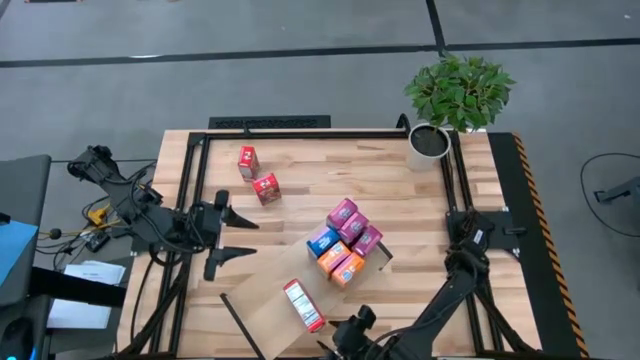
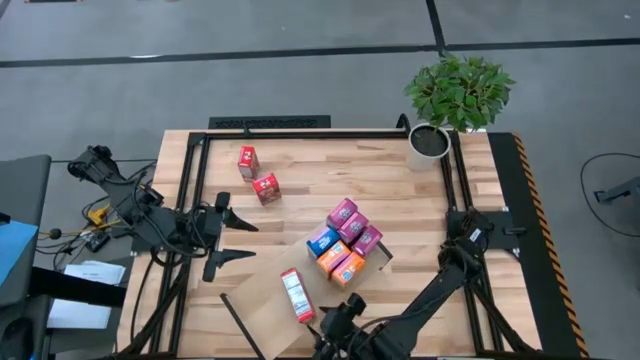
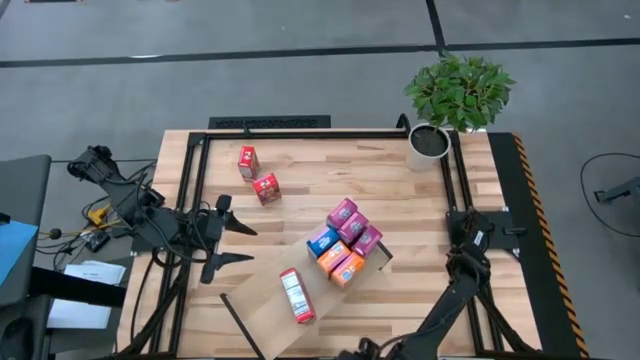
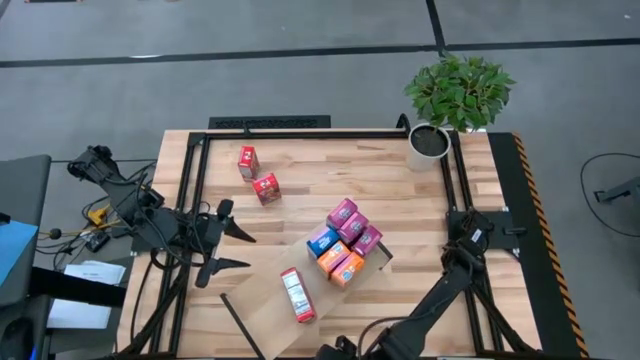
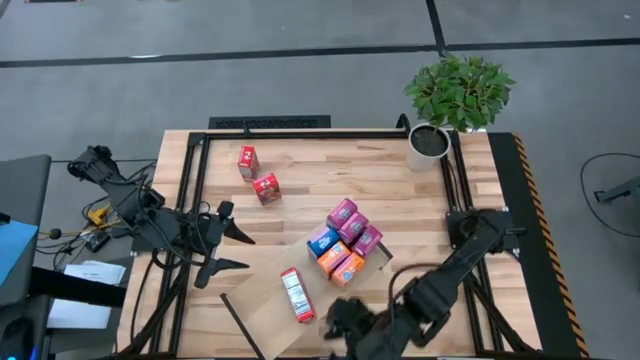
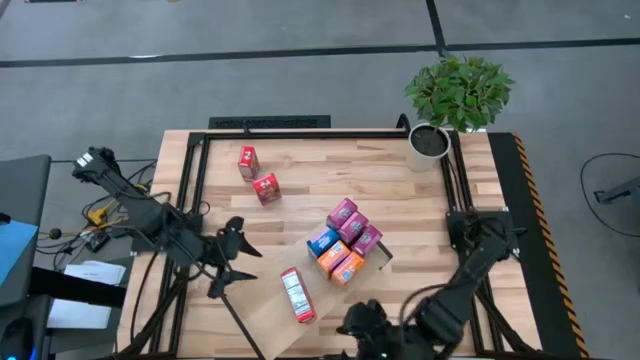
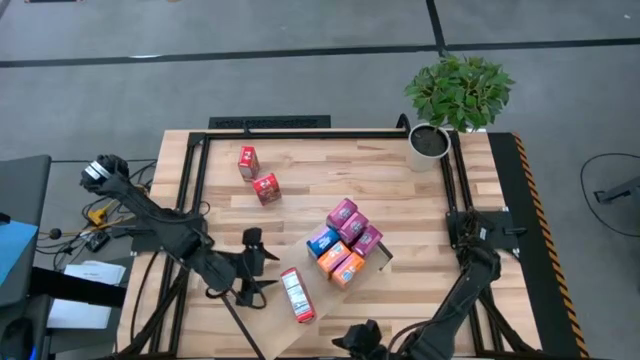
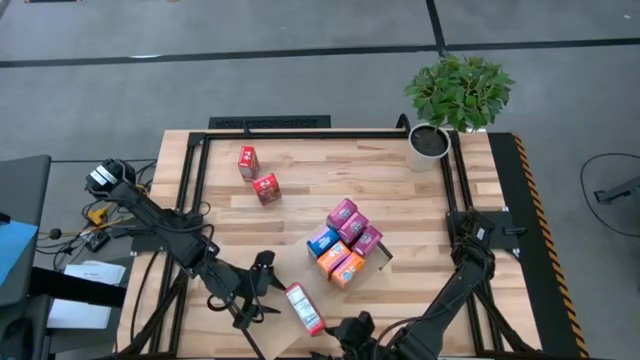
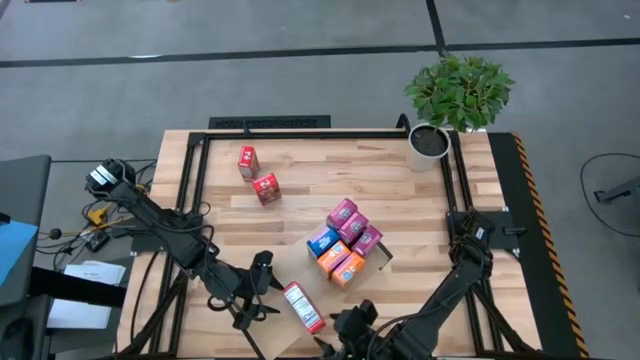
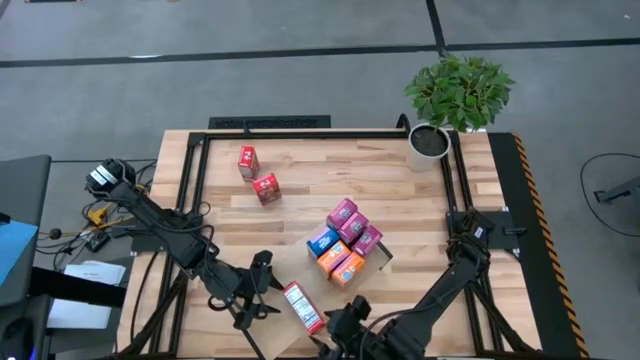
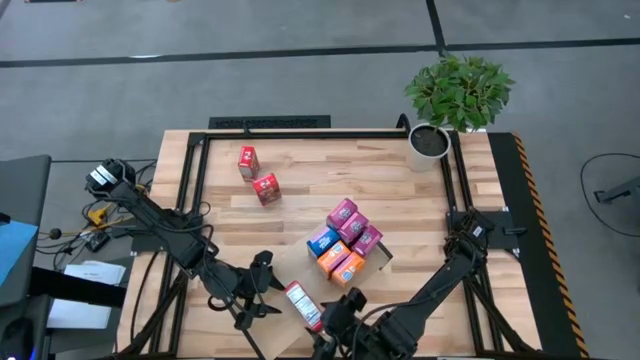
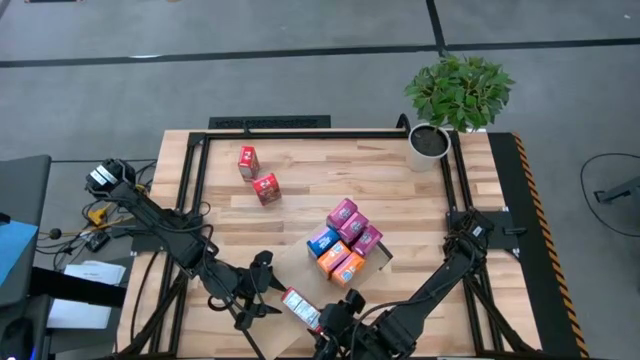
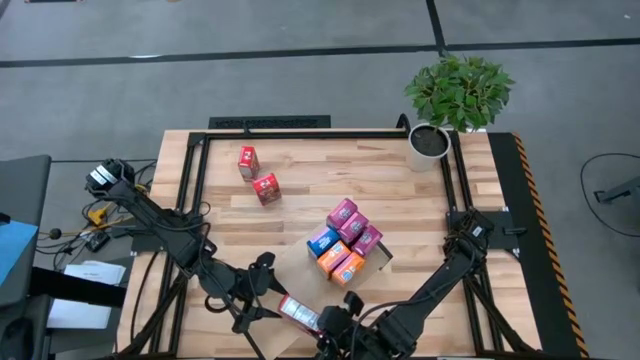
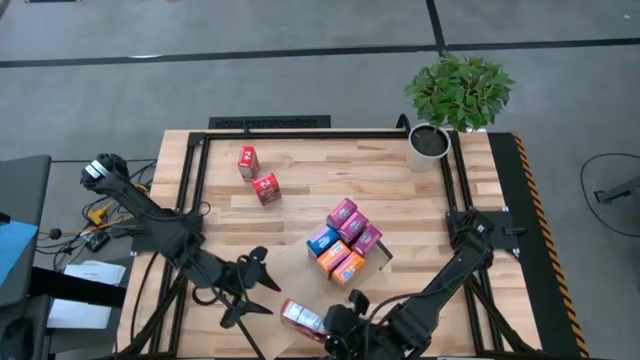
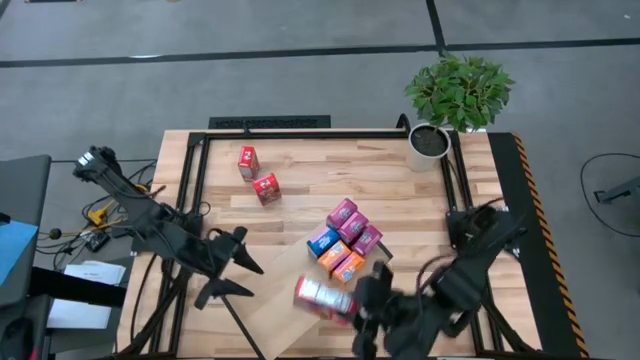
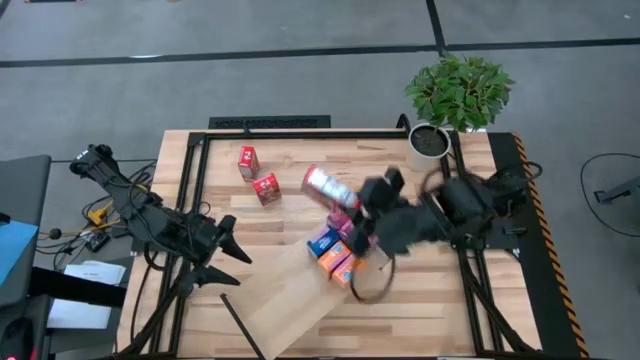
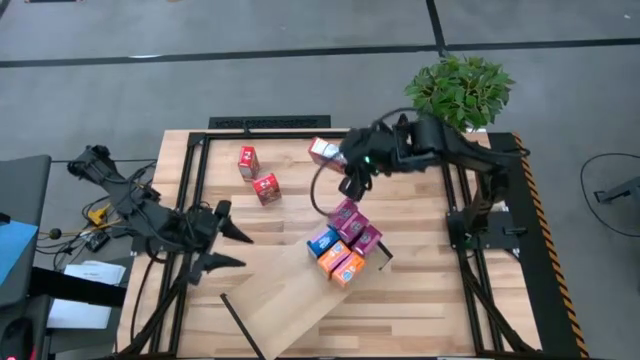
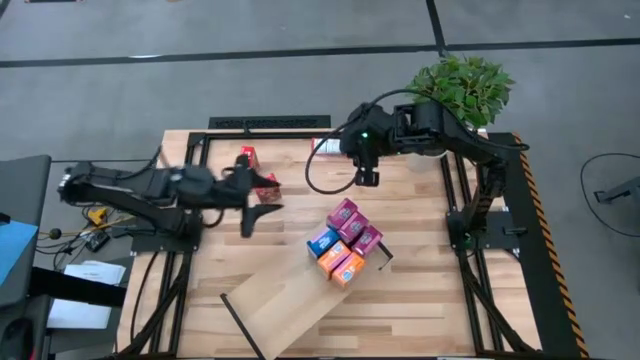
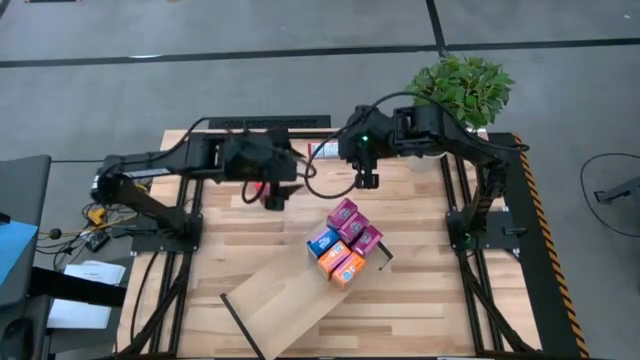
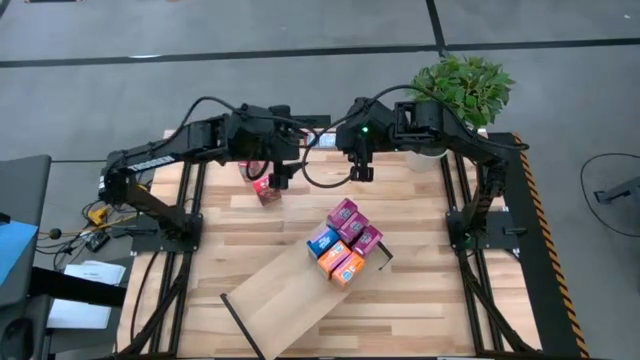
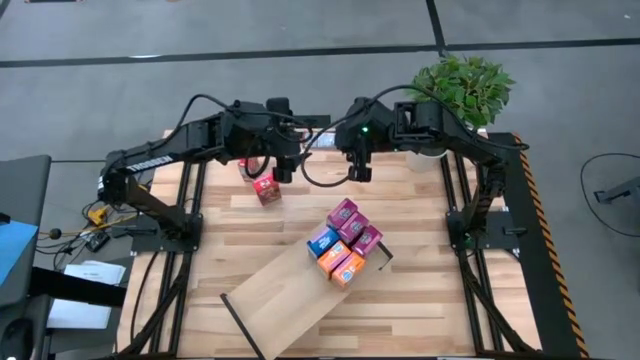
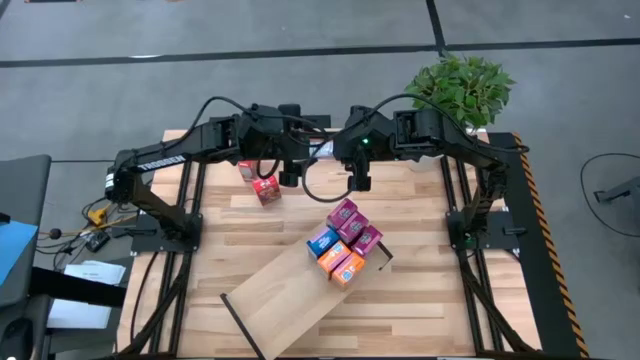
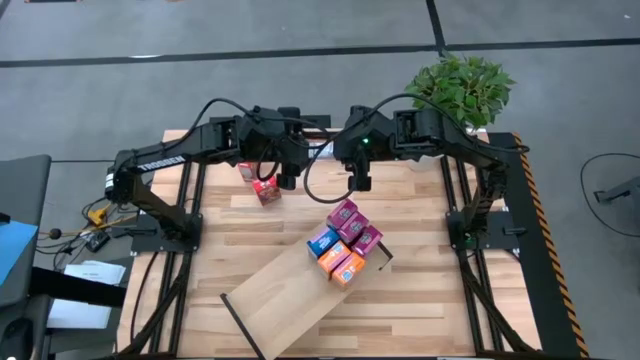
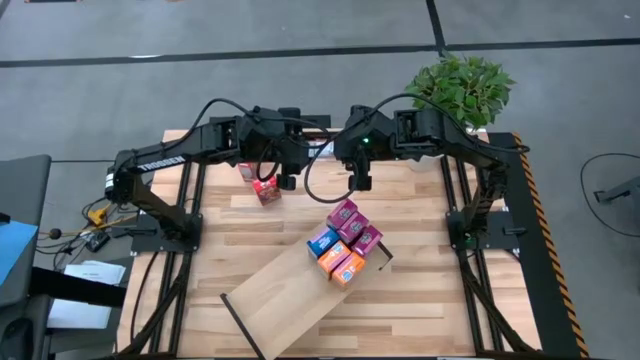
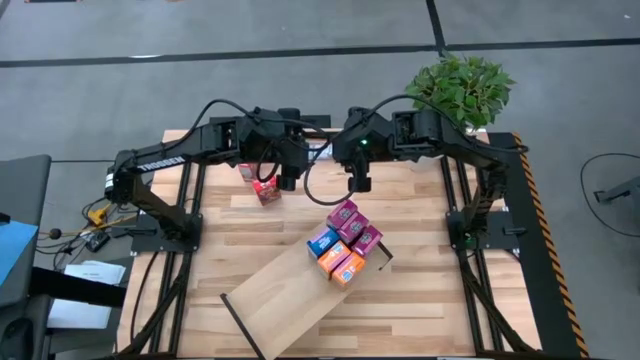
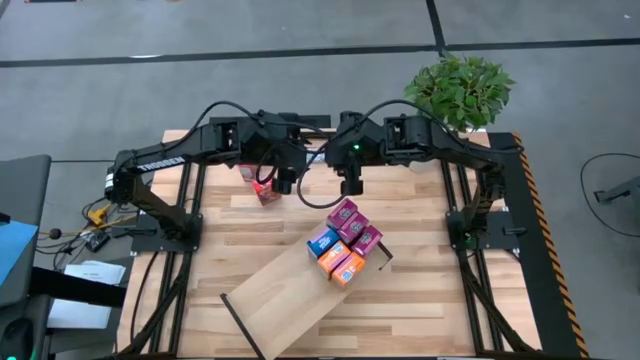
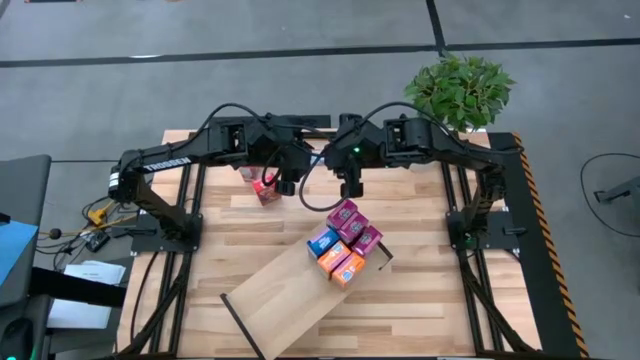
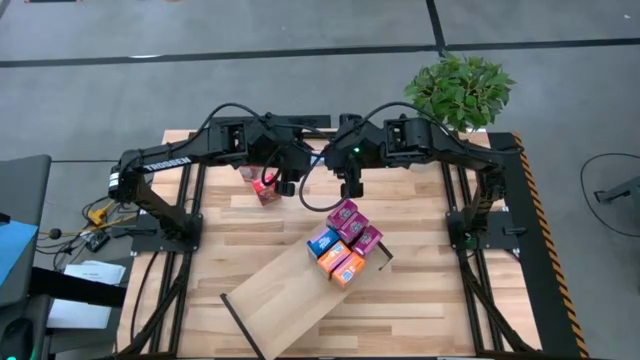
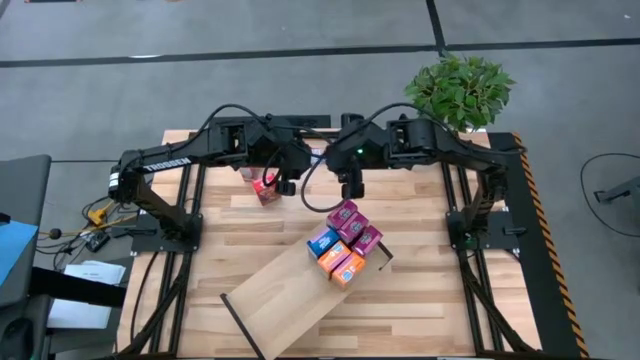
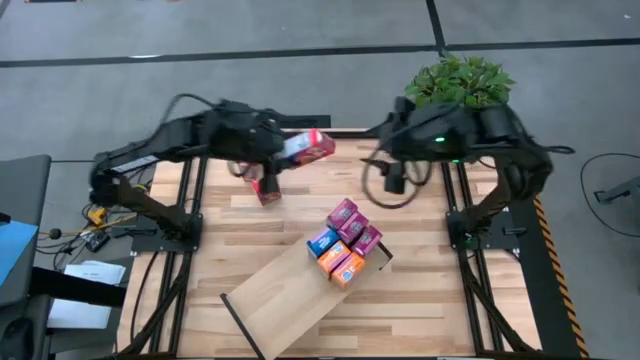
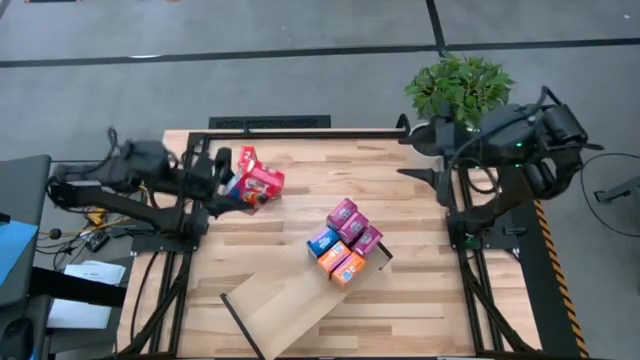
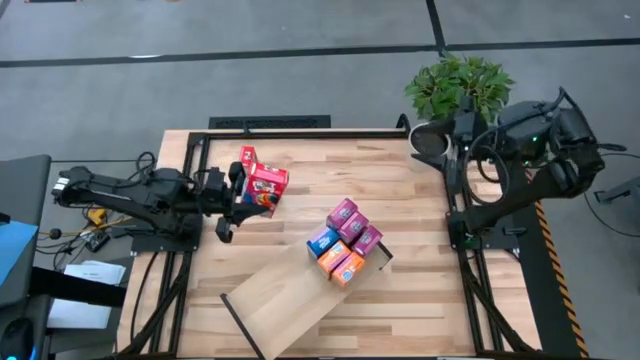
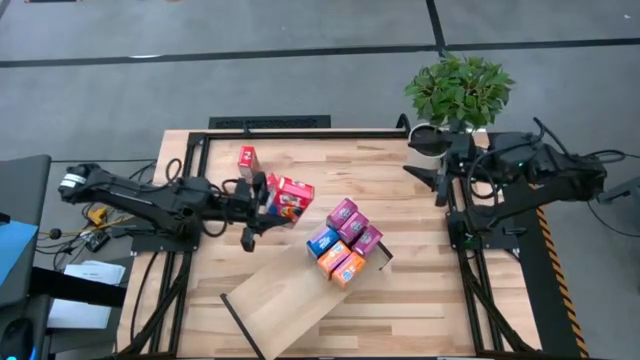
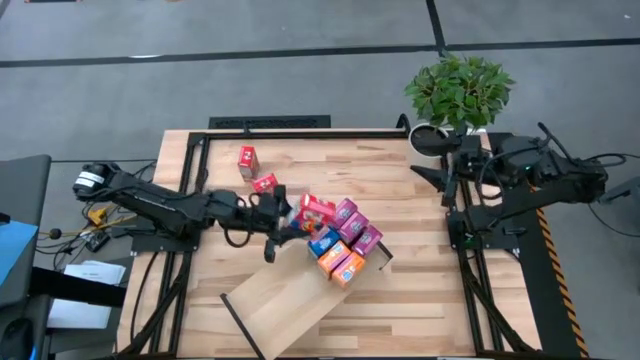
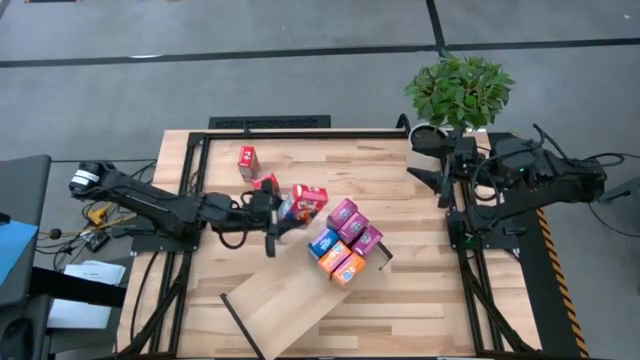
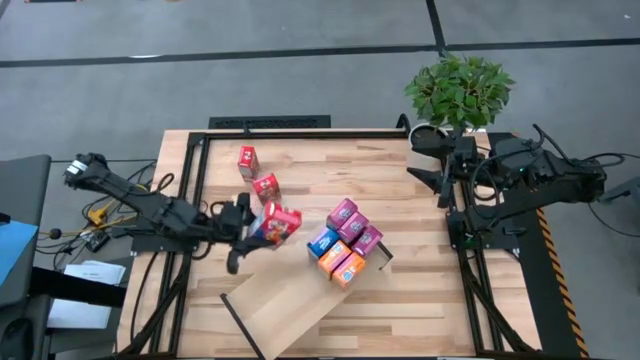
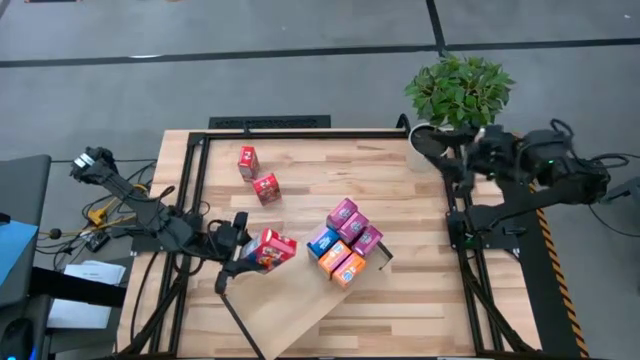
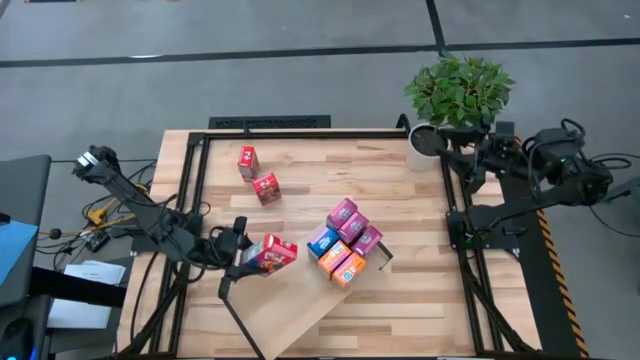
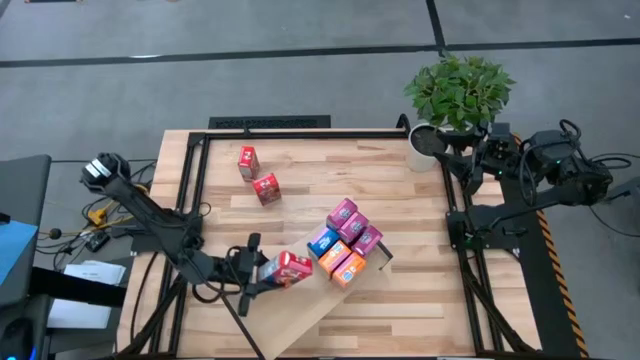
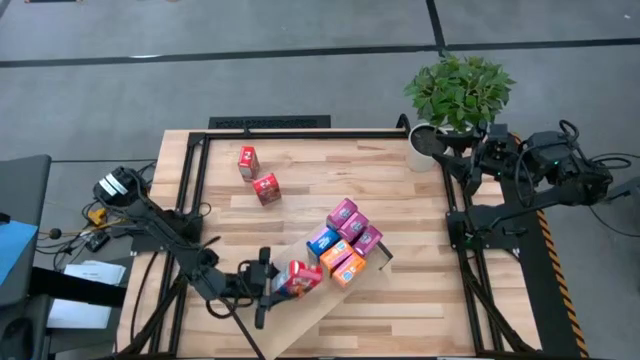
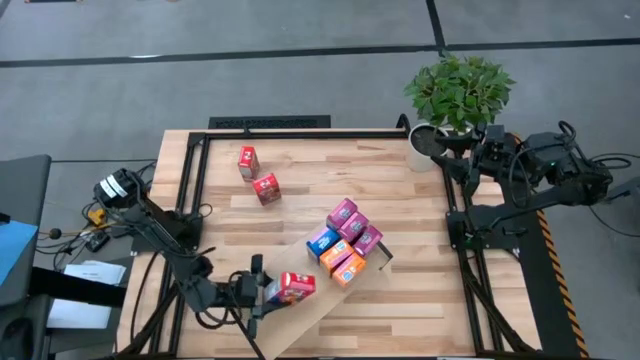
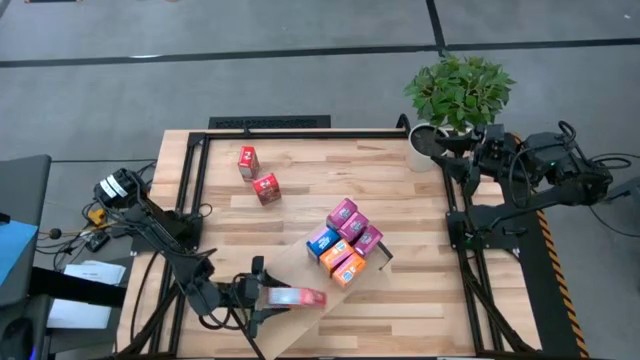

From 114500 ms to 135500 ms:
Task: Stack cereal on shelf
Put the bottom red cereal box onto the shelf
